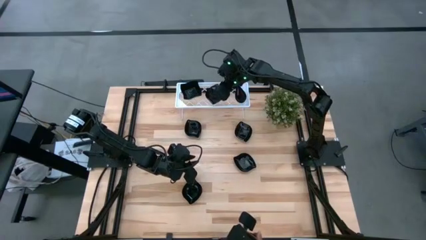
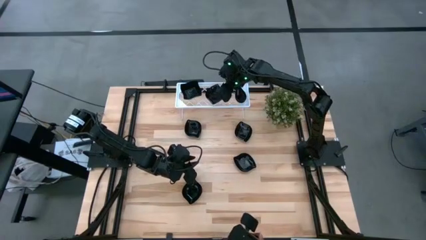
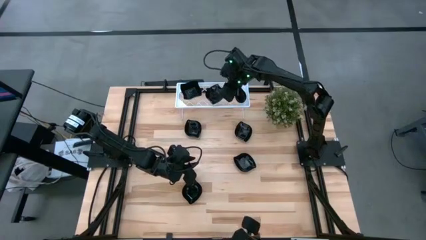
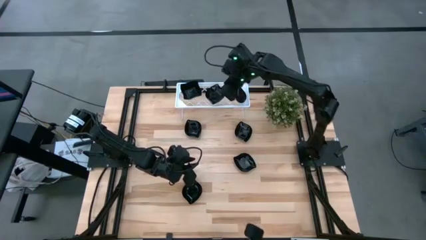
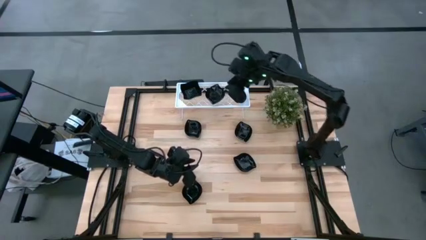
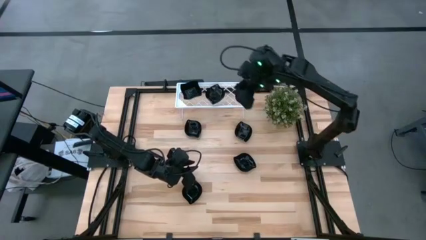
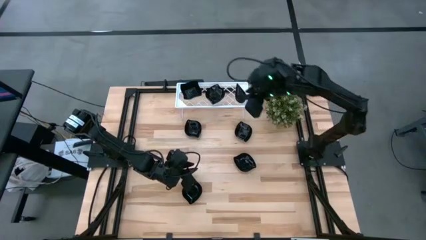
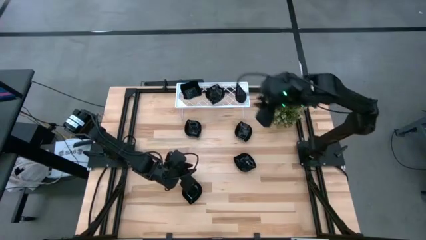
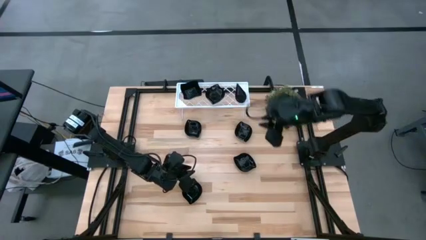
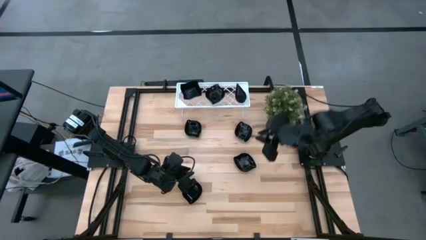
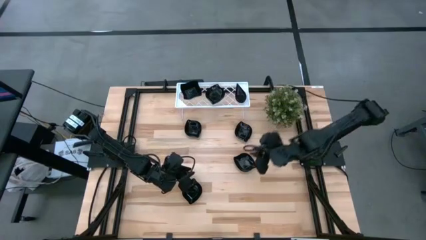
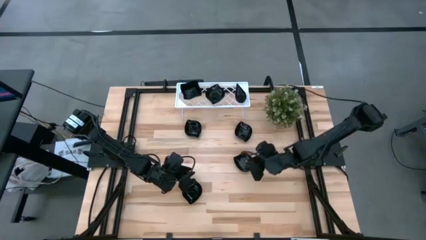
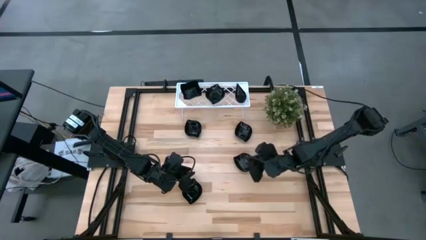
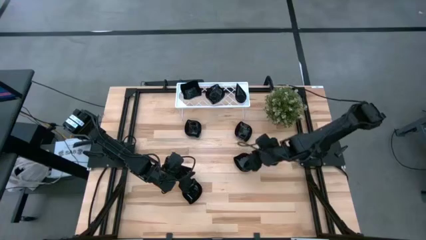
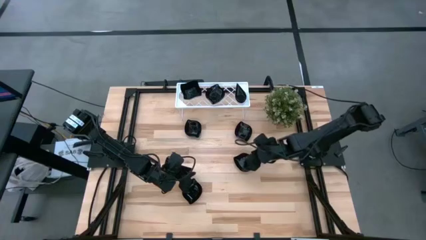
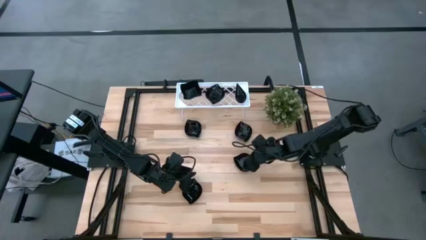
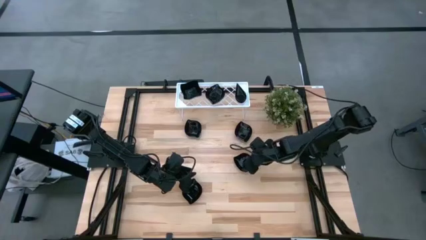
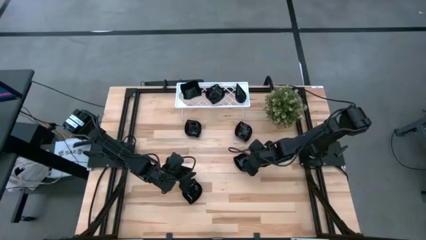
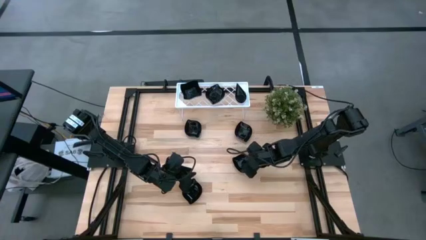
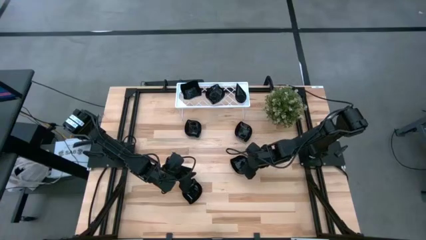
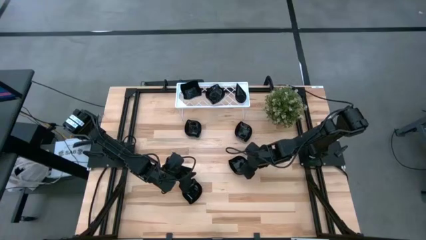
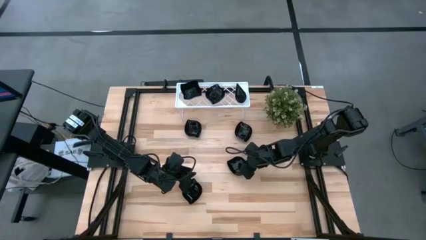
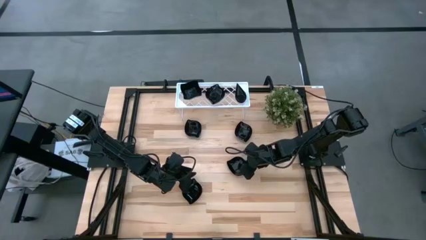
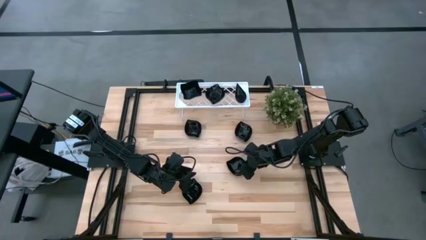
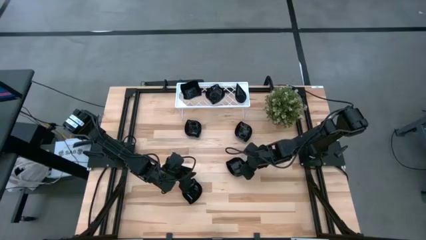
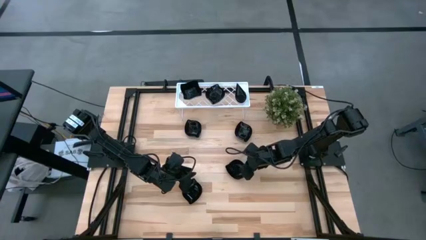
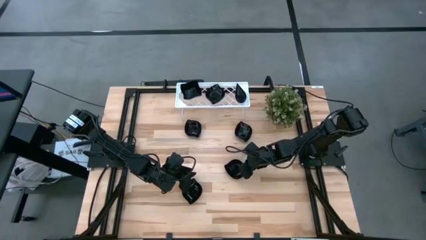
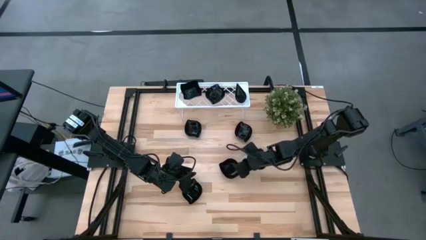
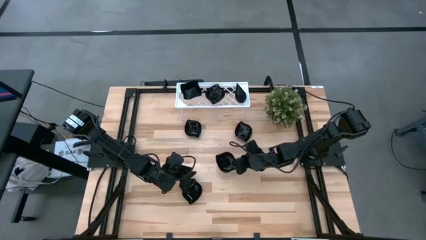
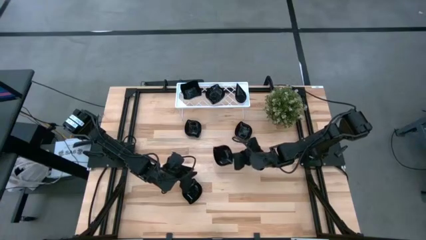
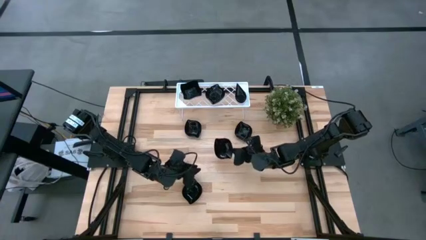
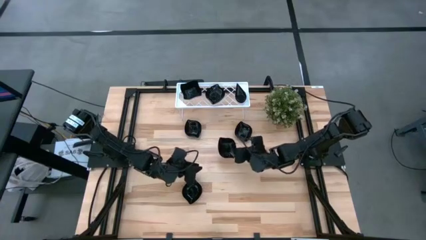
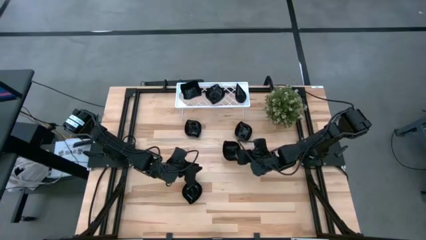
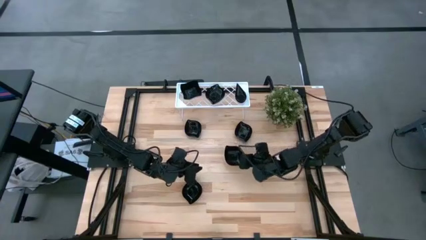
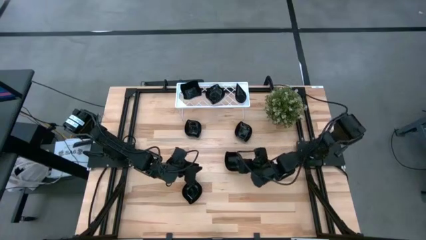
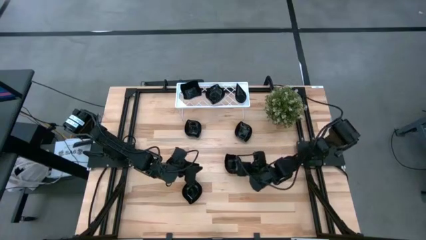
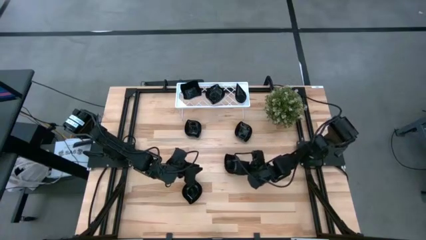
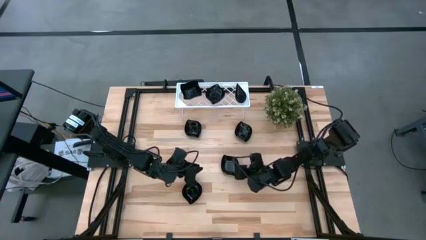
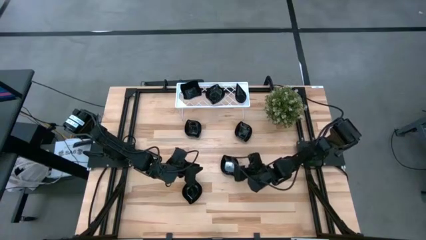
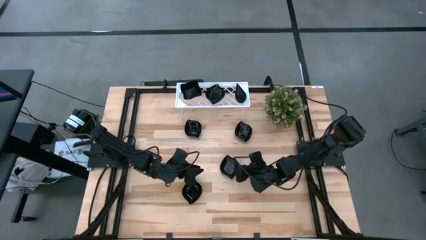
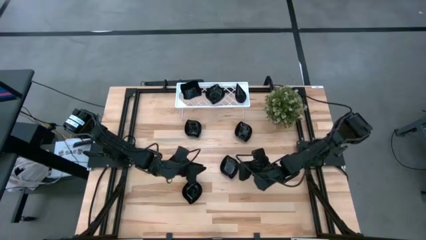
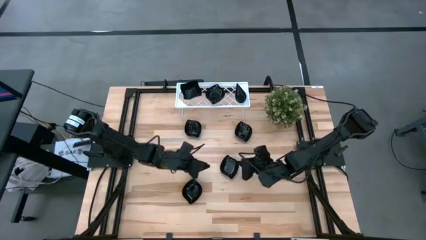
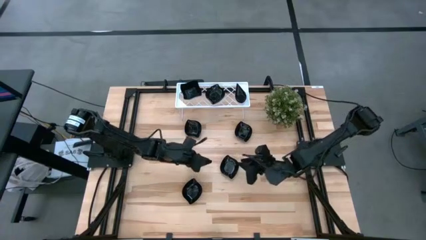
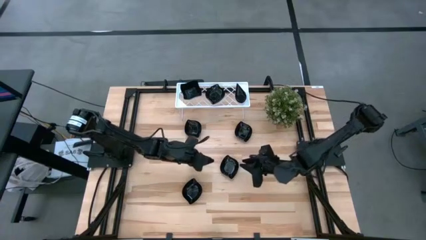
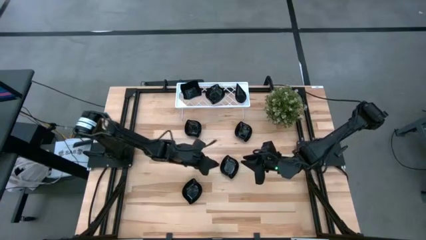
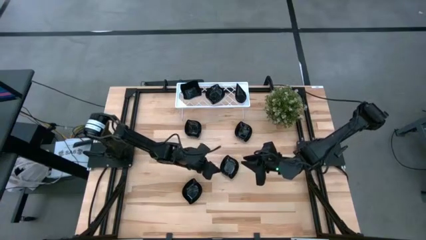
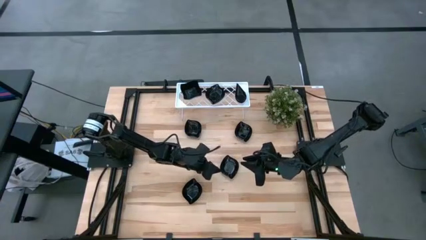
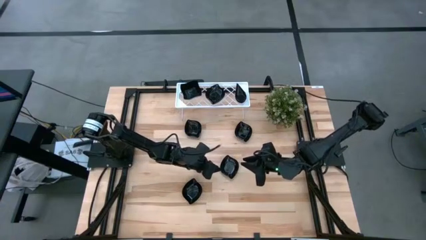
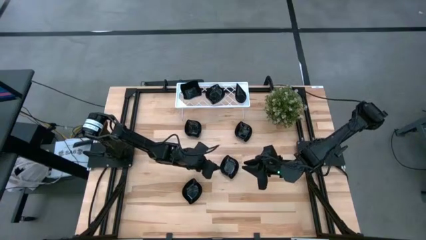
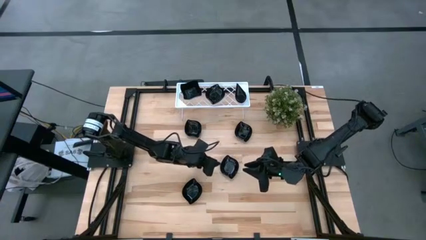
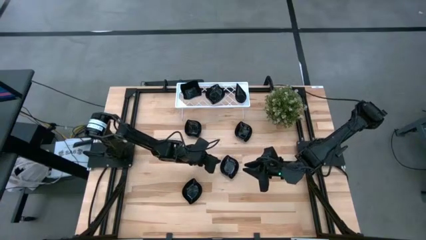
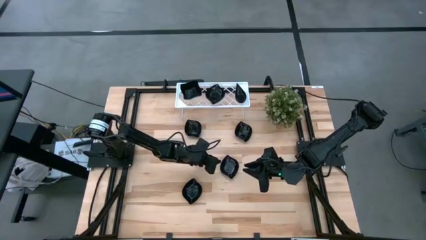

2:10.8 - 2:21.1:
Task: Pick & Place Mini shaped plates
Stack the leaf-shaped plate on top of the leaf-shaped plate on the shelf
